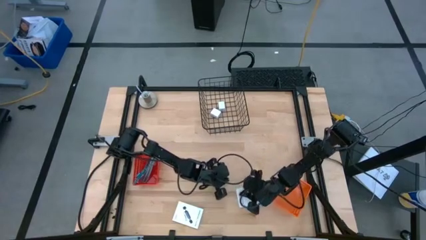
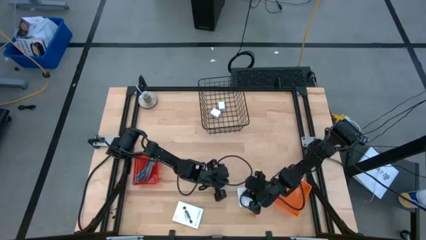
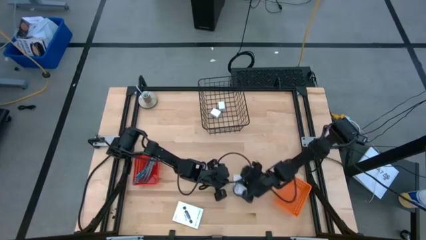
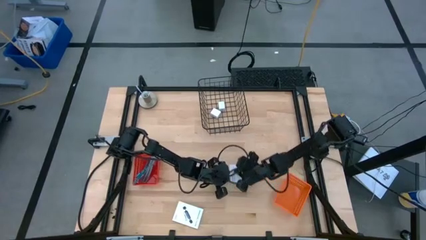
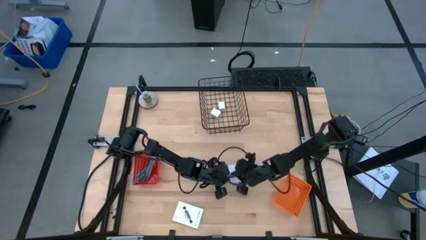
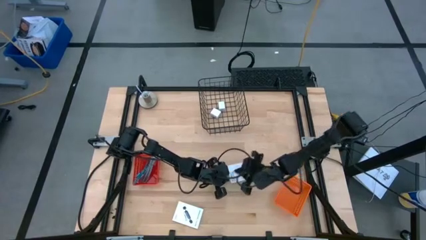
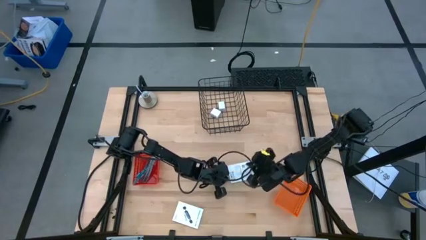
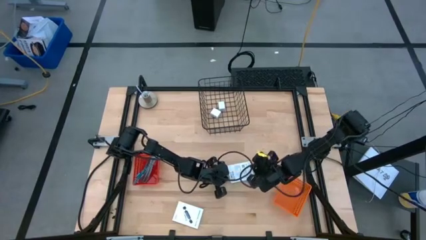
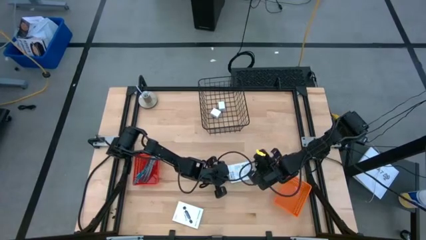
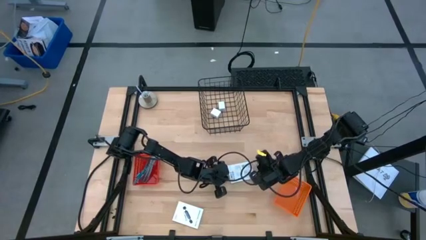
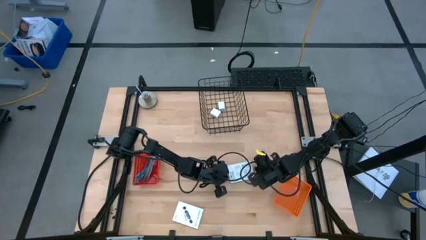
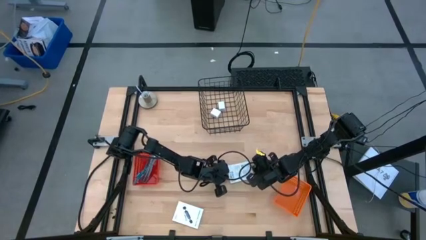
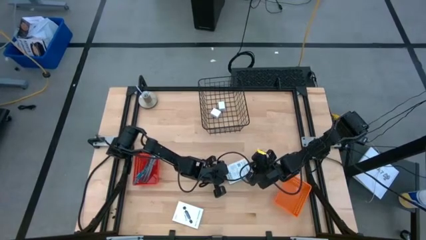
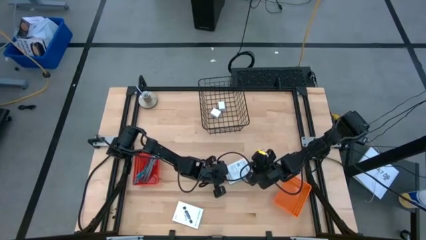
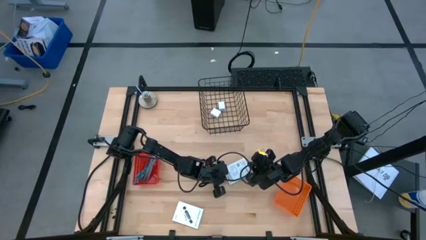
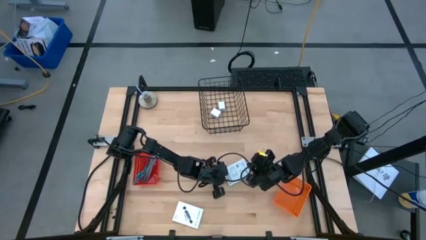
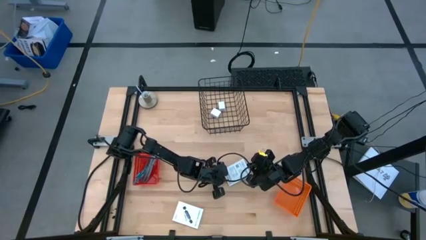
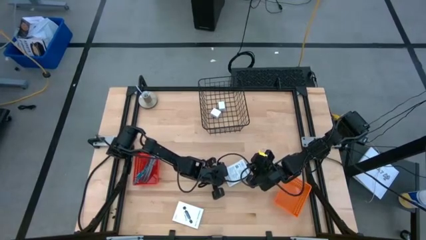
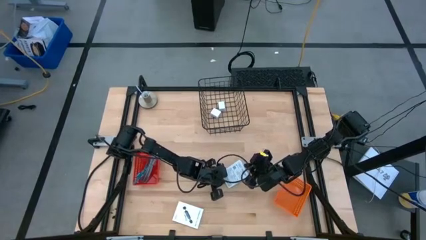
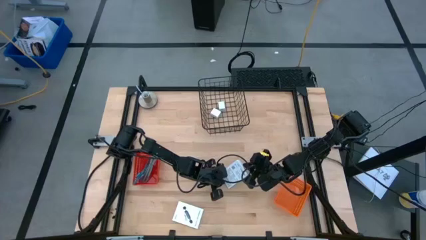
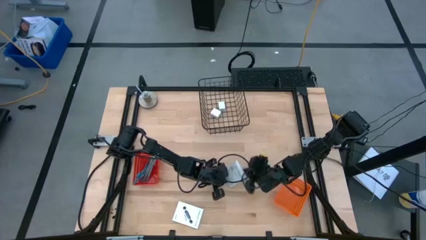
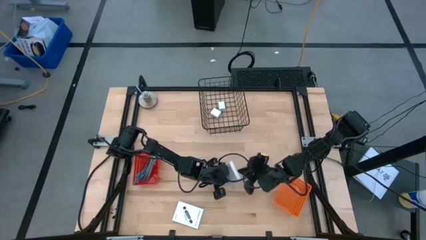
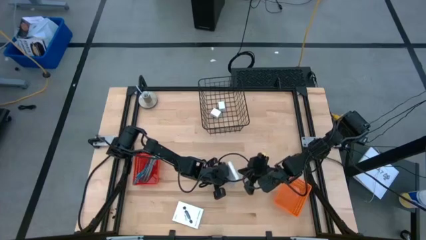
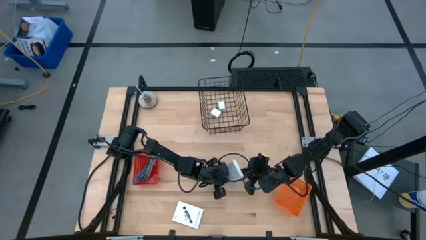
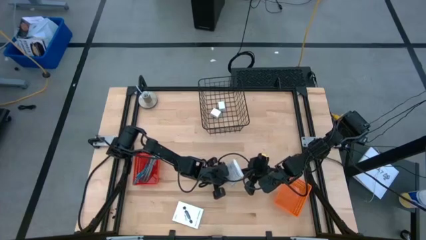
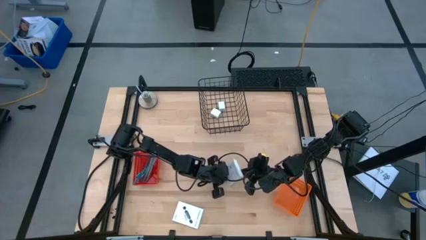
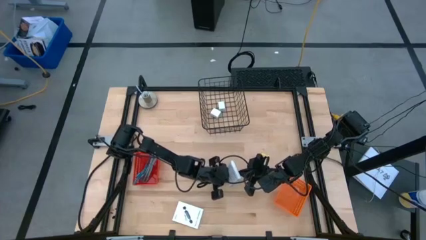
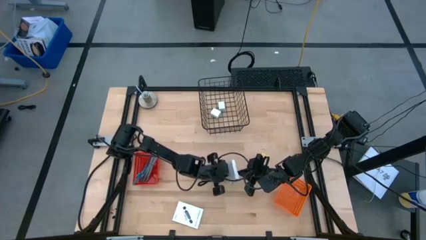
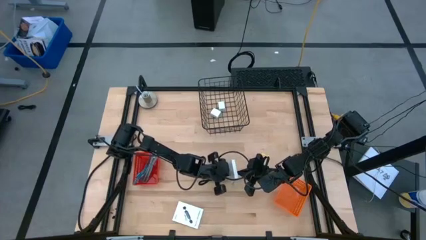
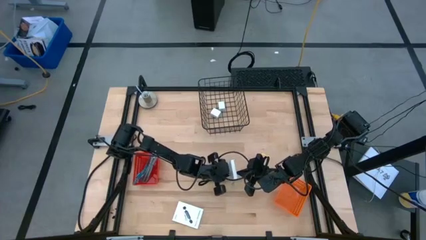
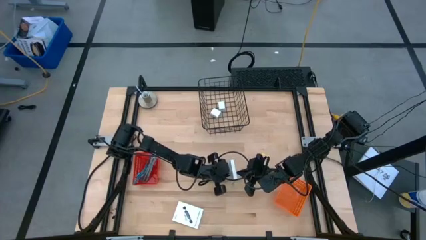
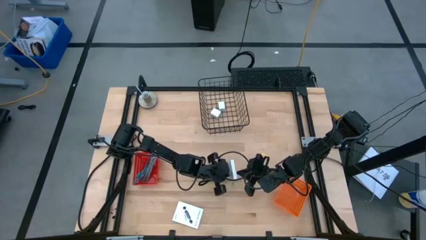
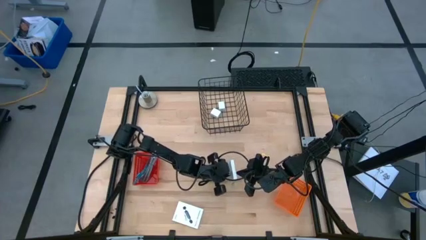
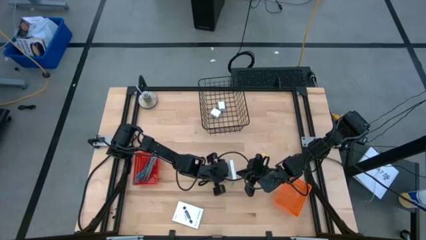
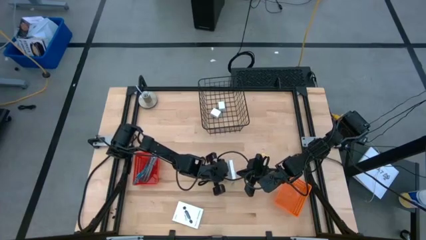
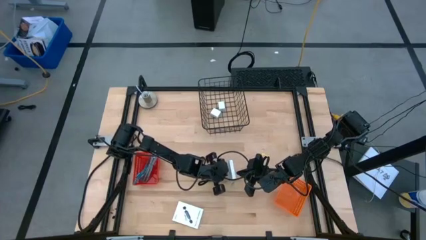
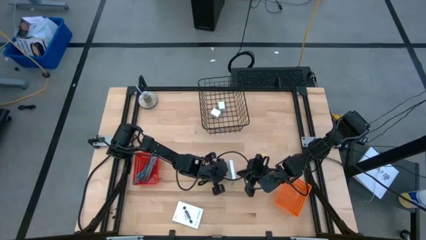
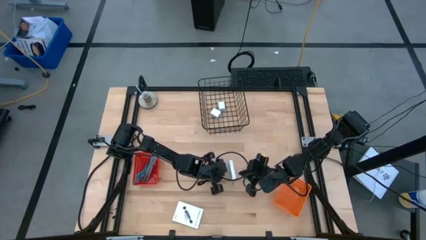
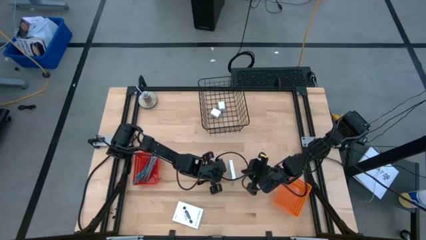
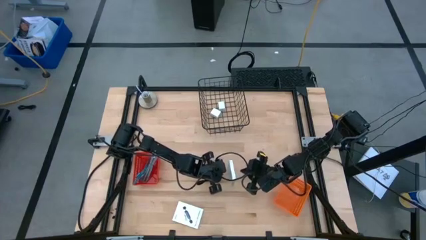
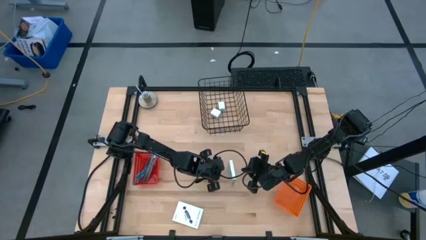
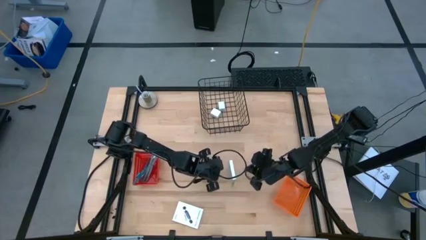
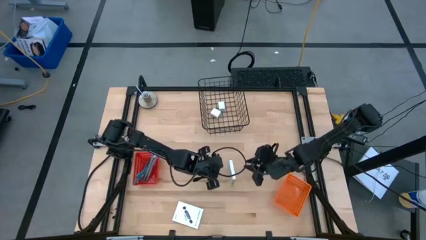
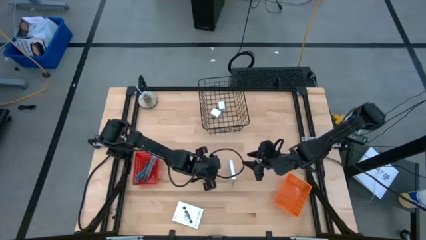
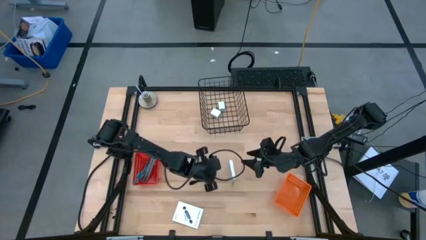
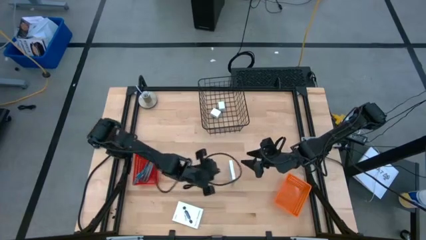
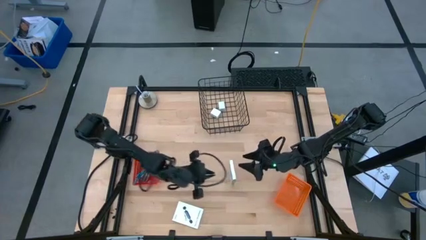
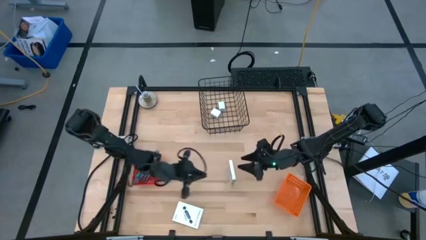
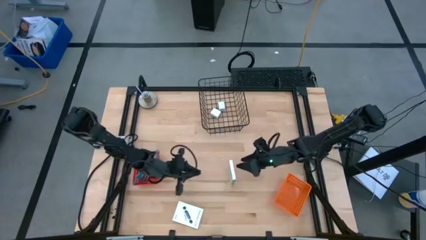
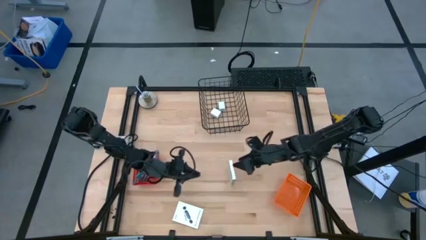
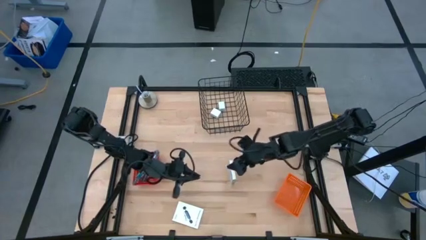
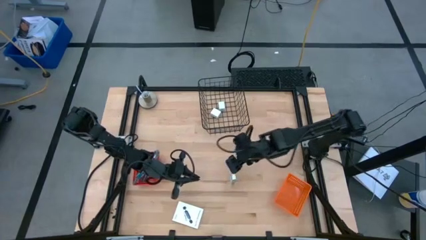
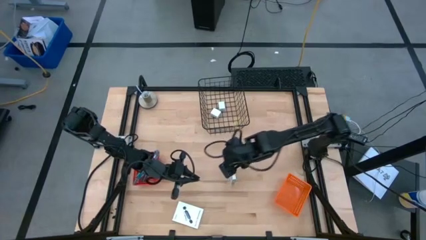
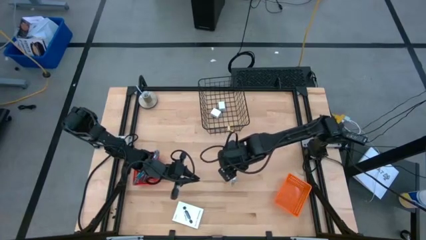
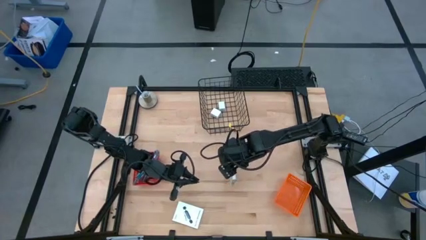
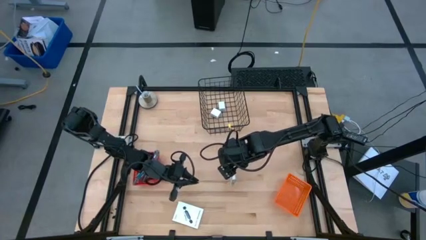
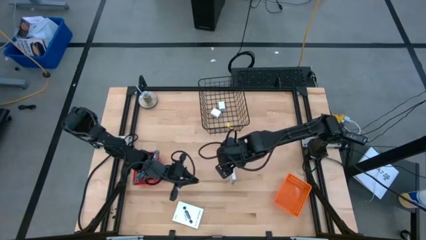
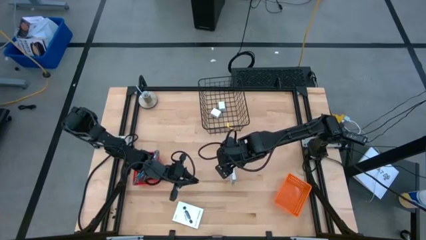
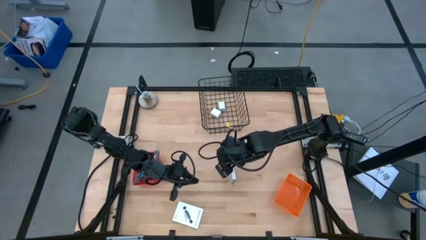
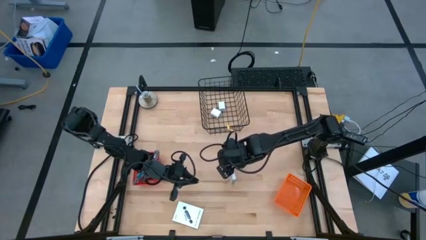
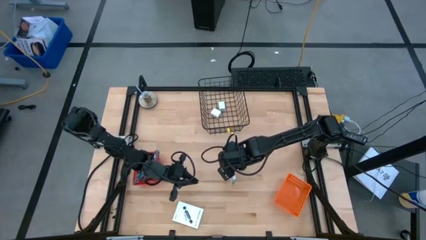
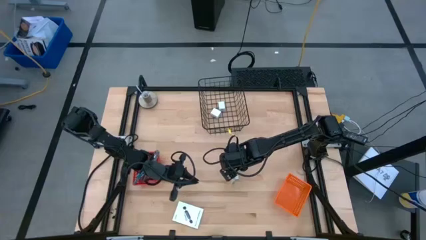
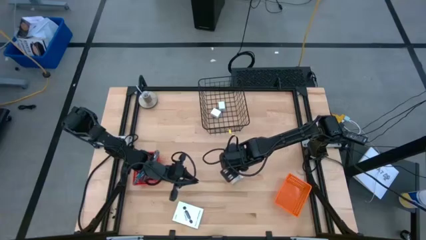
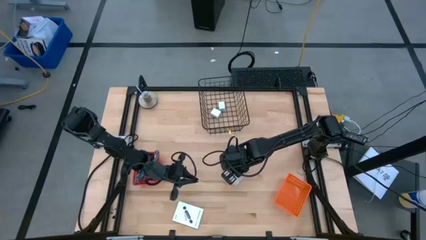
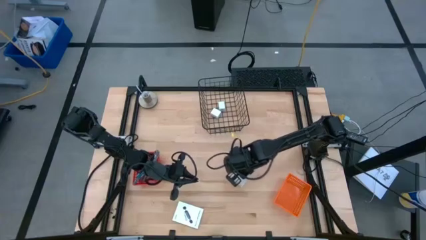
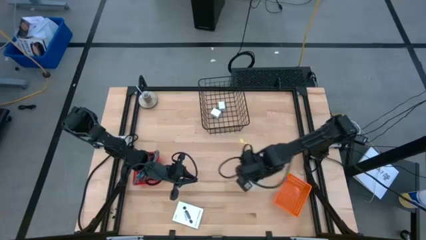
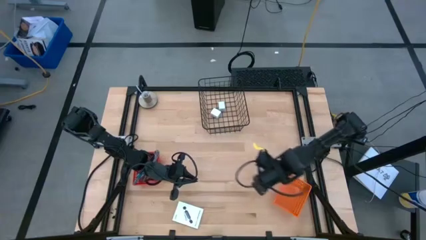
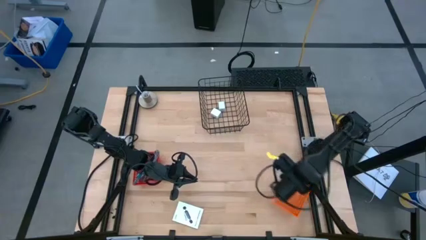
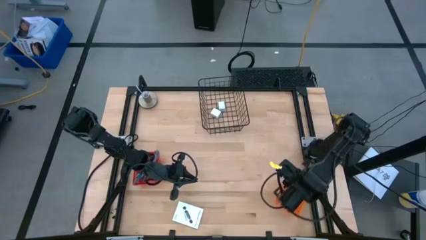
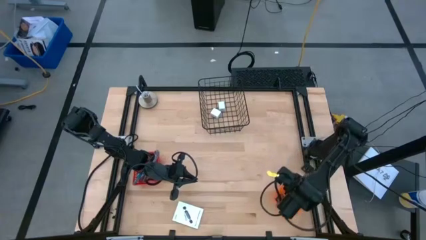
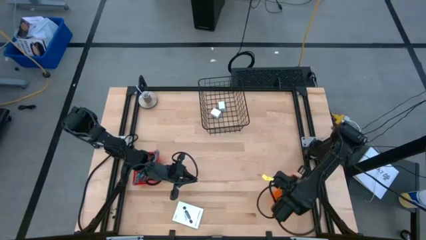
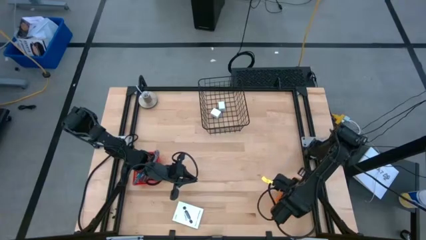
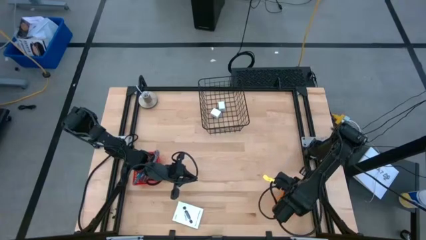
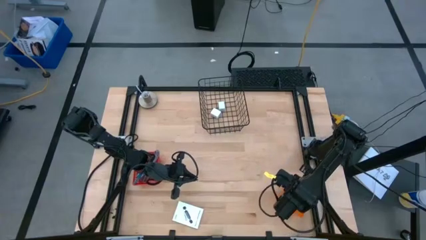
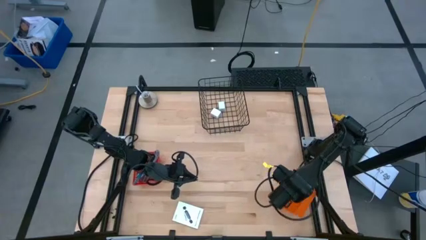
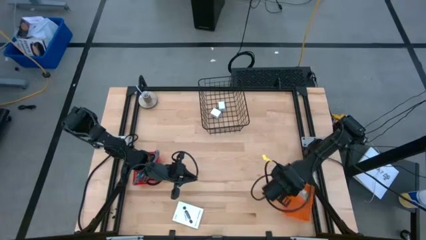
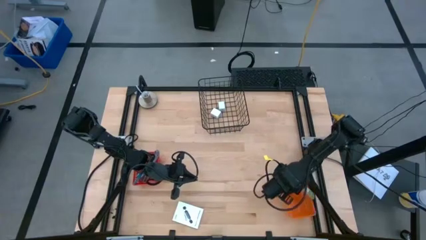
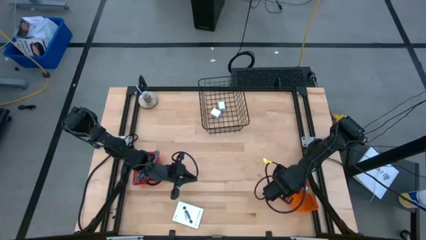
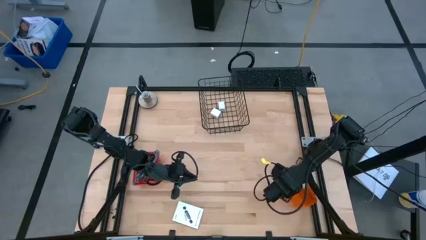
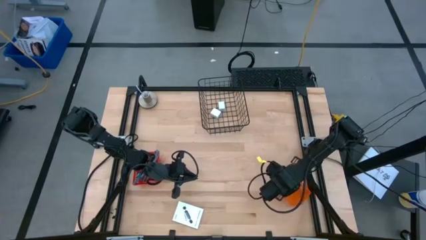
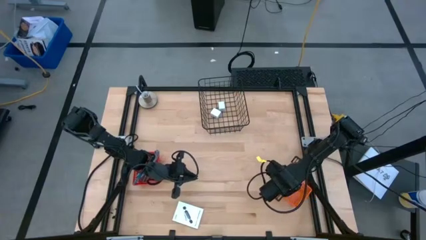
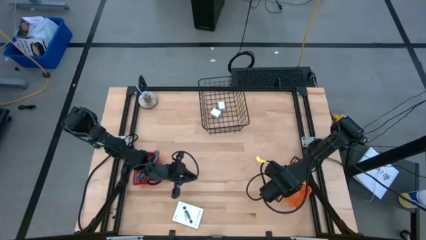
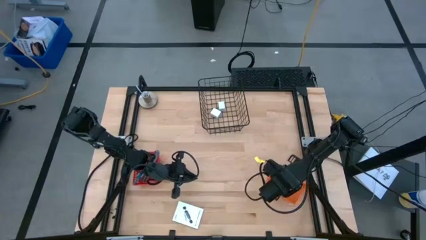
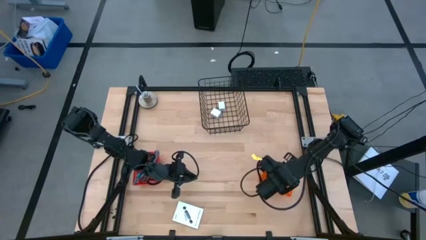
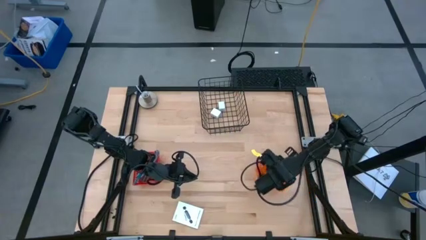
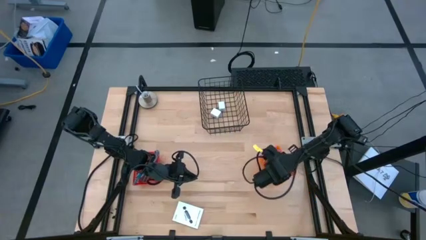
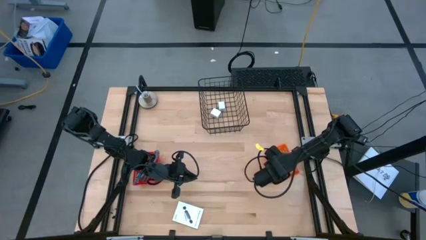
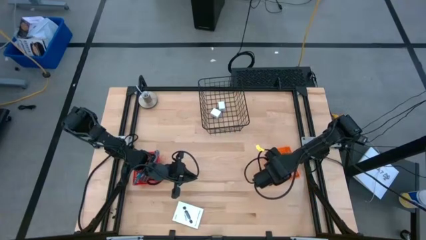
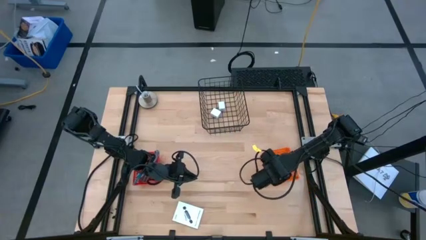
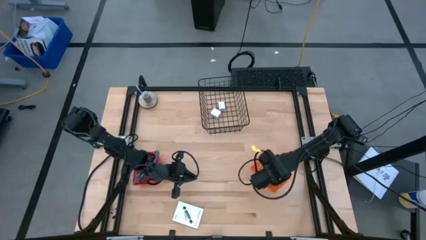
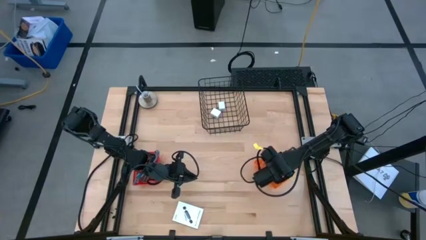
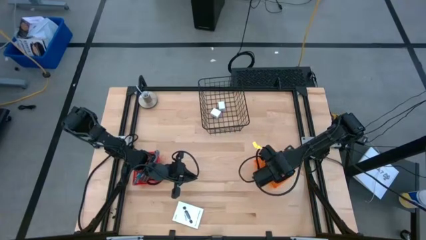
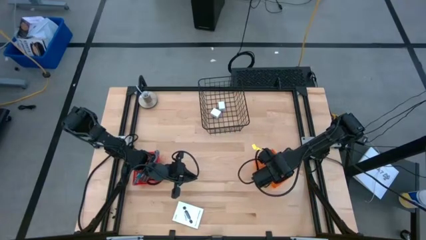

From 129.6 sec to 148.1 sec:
Task: Pick and place items into bin
Put the right card reader box into the orange basket
